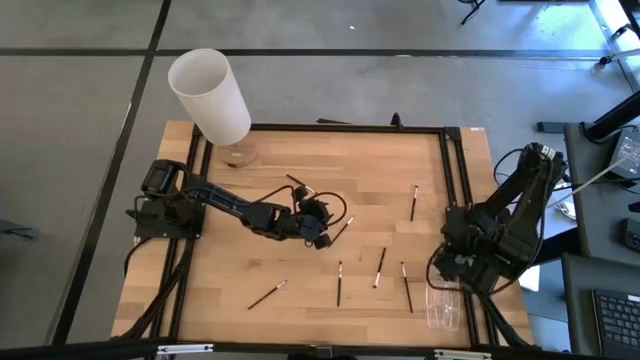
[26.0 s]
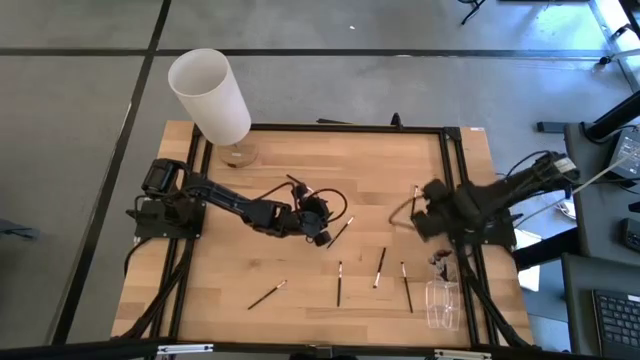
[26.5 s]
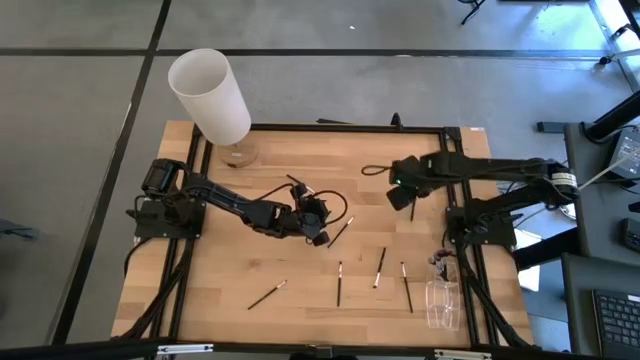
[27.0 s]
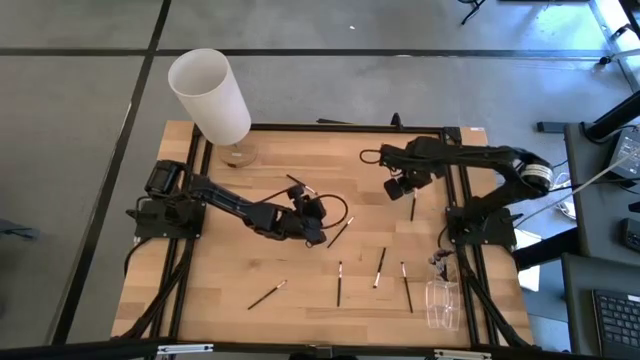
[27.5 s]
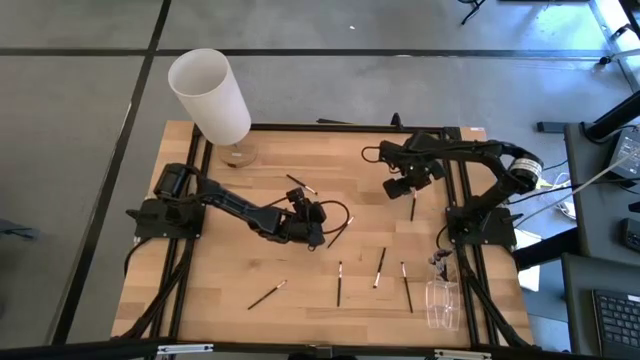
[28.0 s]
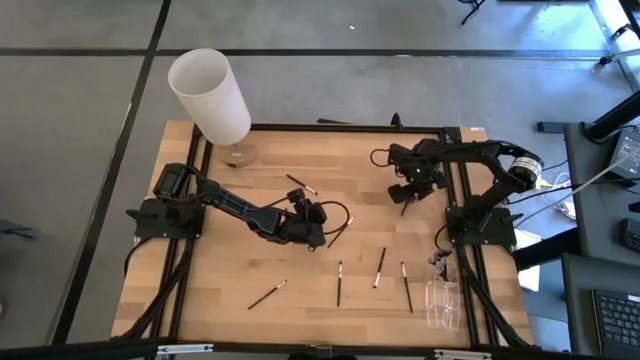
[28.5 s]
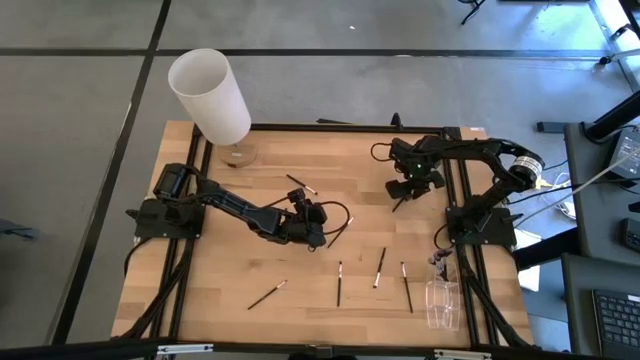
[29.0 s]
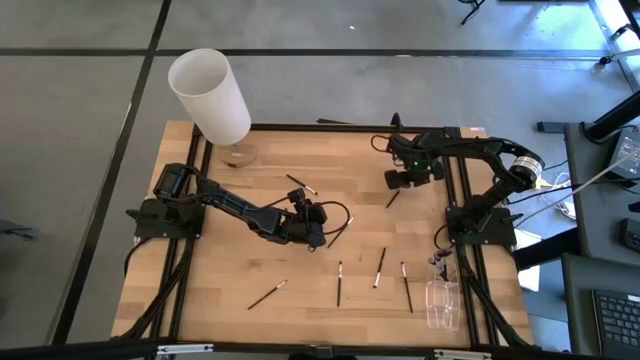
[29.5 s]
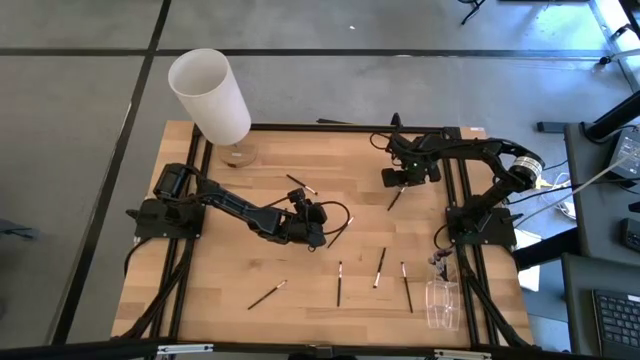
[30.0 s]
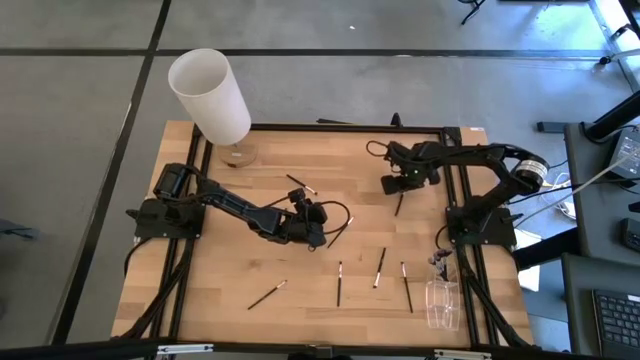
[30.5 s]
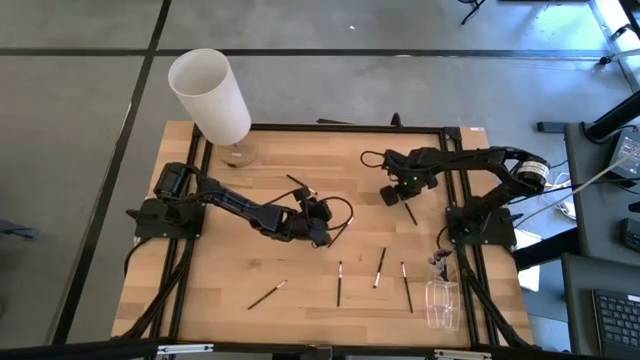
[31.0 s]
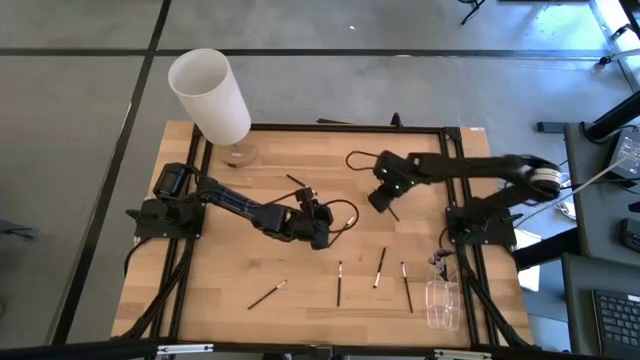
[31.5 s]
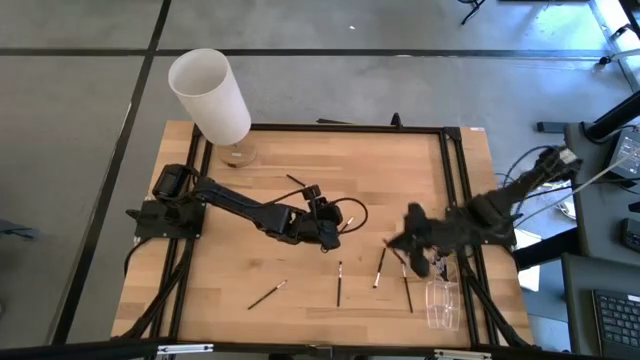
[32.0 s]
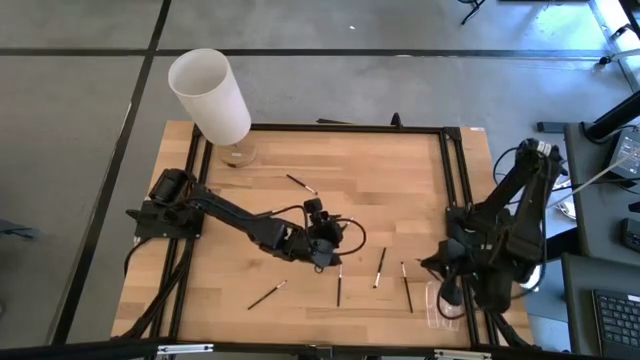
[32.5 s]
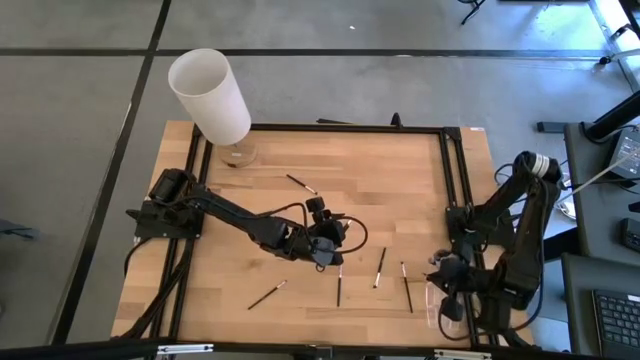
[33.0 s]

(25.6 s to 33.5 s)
Task: Put items in baskets/containers
Put the foundation brush into the transparent organizer

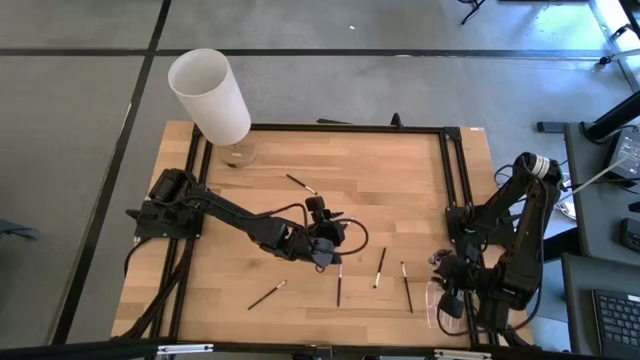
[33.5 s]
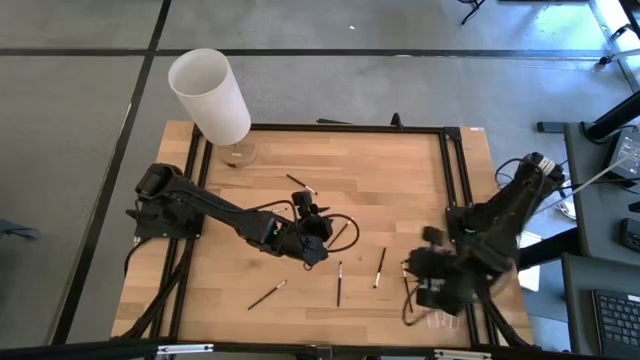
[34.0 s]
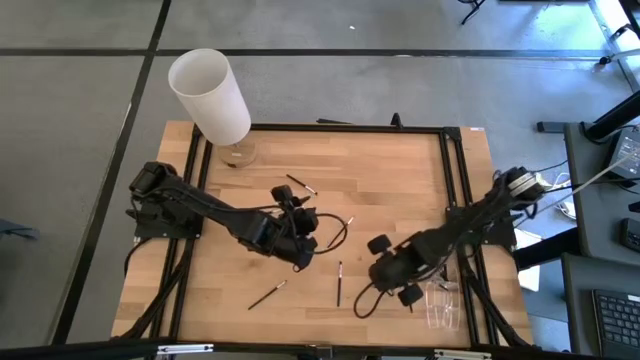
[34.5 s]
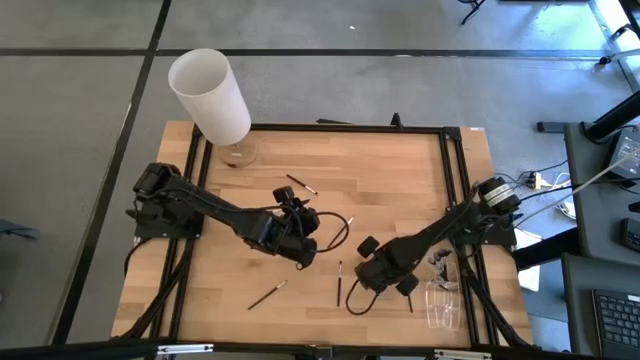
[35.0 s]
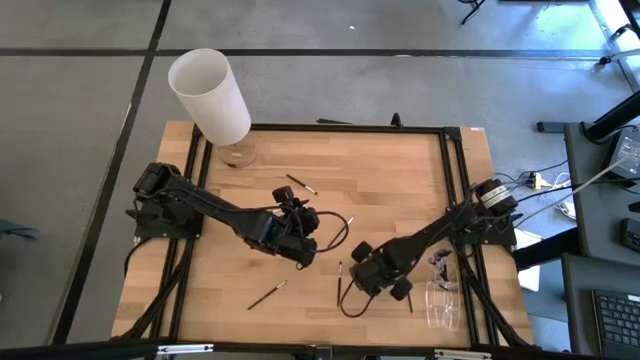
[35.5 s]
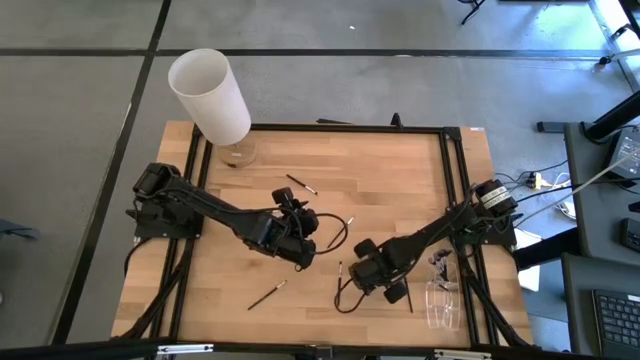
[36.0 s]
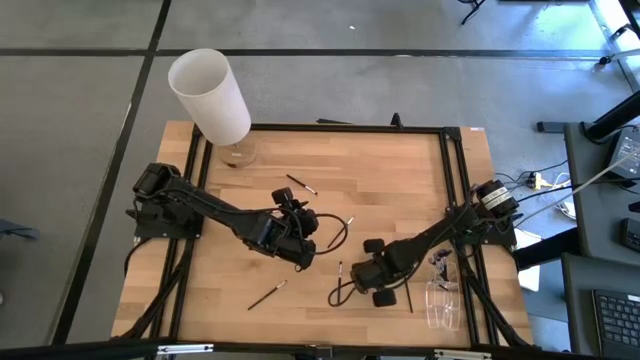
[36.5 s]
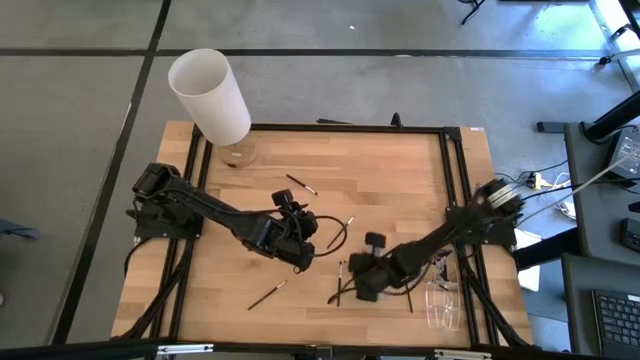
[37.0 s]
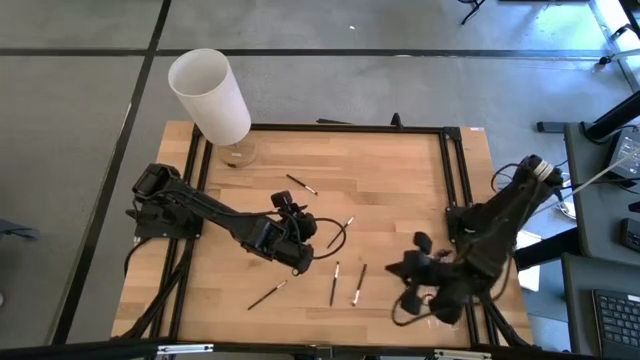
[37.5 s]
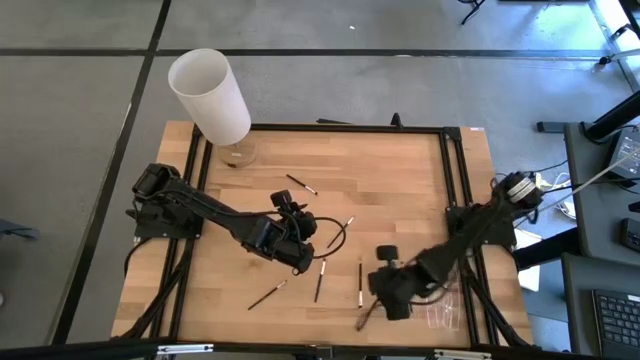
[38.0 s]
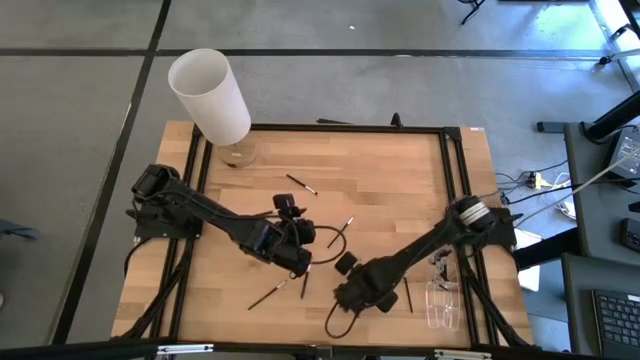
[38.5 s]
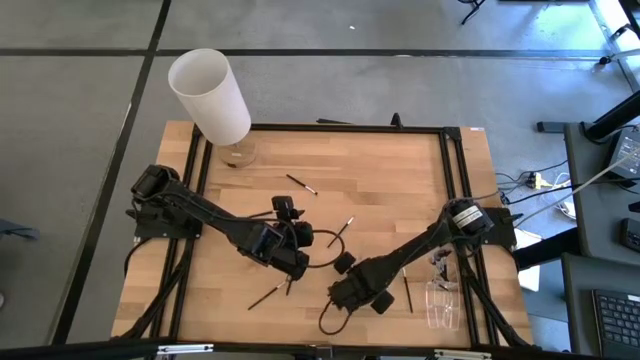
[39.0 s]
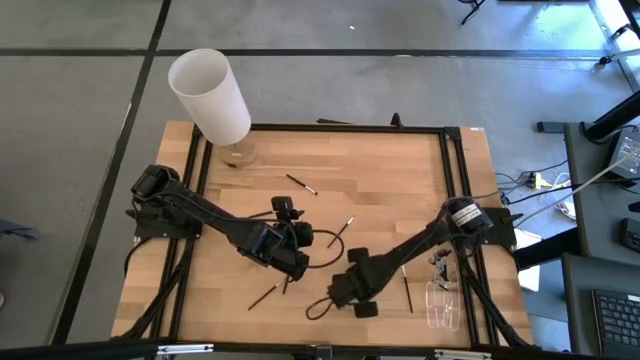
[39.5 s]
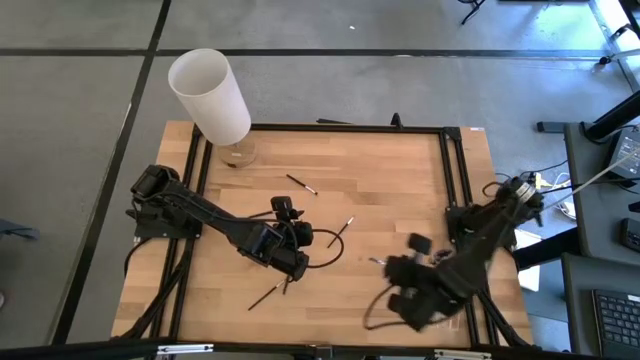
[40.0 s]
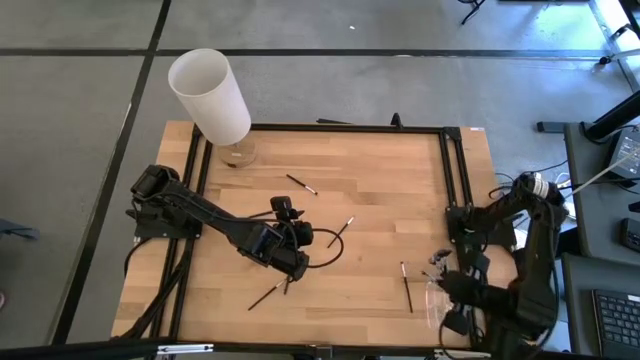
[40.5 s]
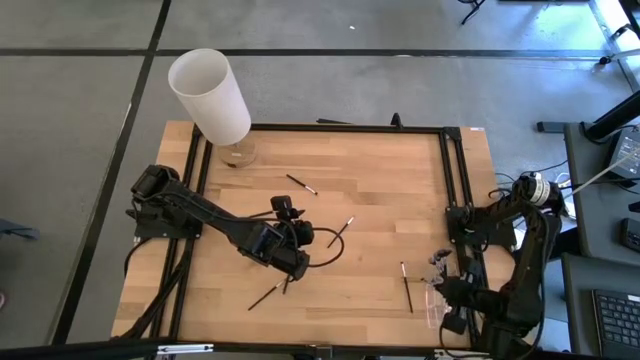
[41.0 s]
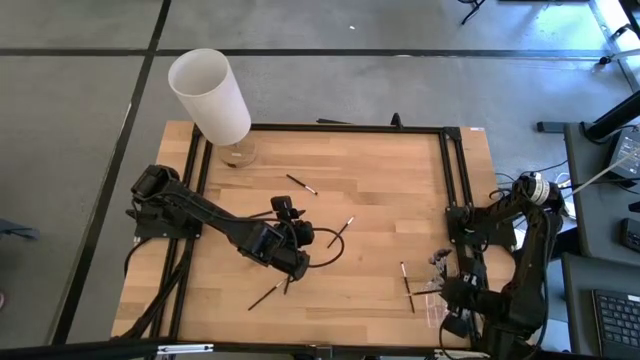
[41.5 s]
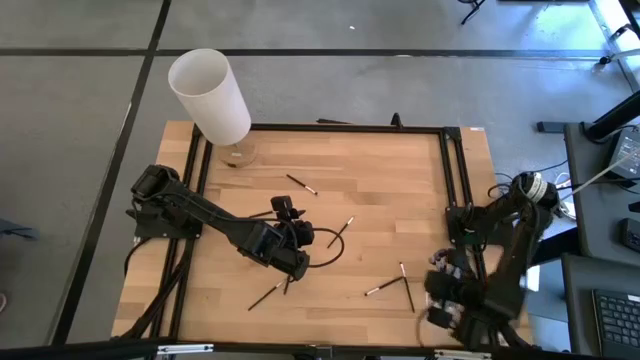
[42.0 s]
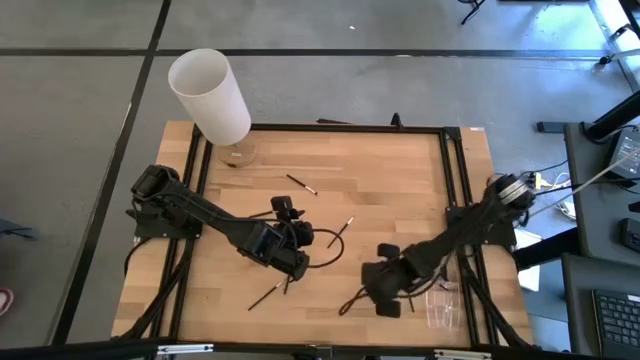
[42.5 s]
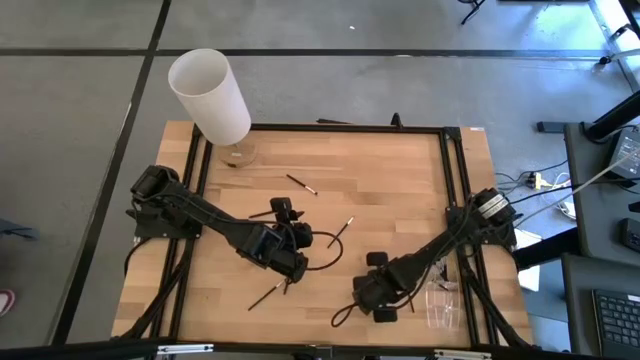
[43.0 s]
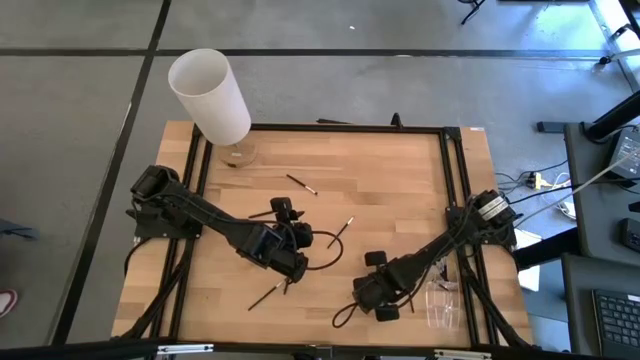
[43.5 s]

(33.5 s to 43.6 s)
Put the eyeshadow brush into the transparent organizer

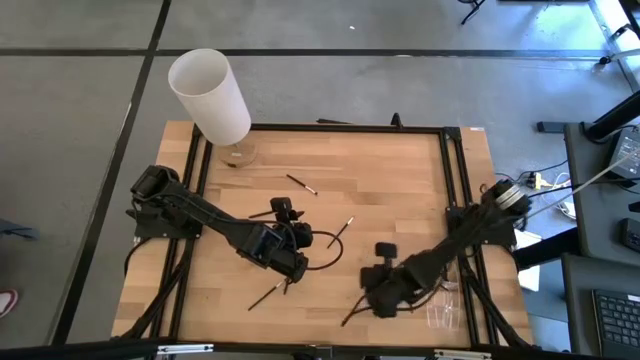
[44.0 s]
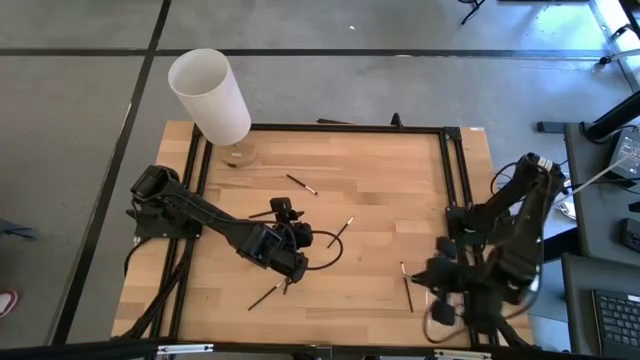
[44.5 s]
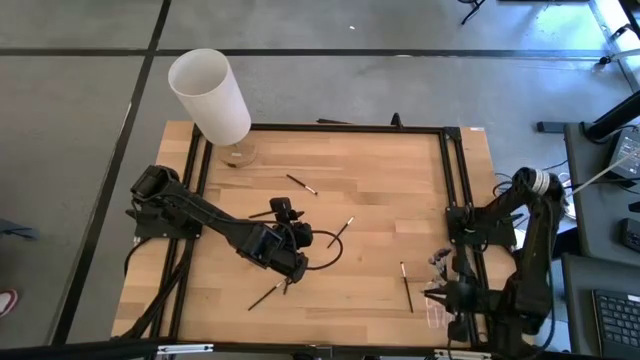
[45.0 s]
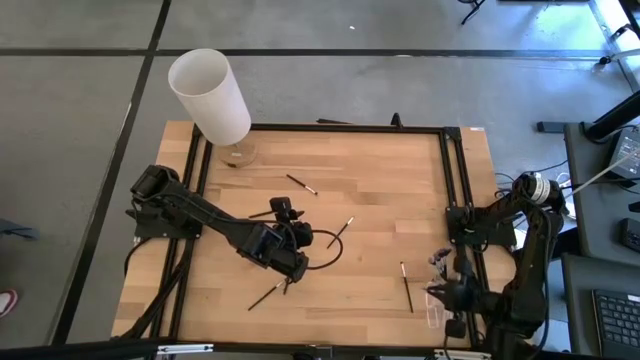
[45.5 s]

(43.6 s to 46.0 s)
Put the eyeshadow brush into the transparent organizer

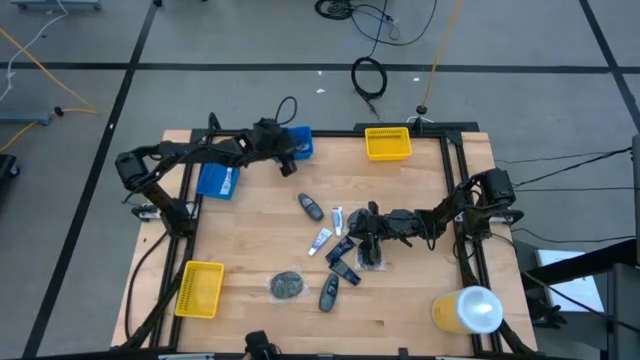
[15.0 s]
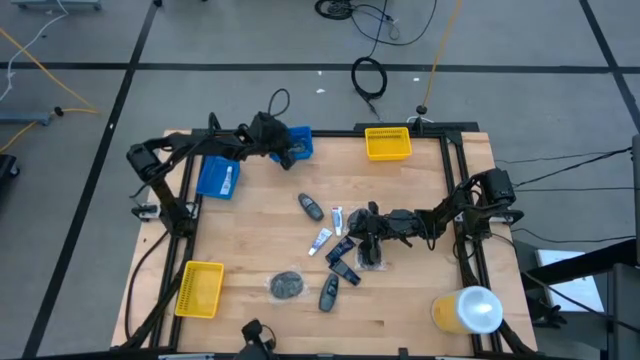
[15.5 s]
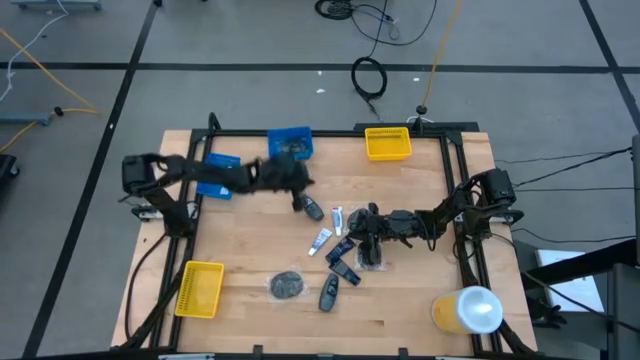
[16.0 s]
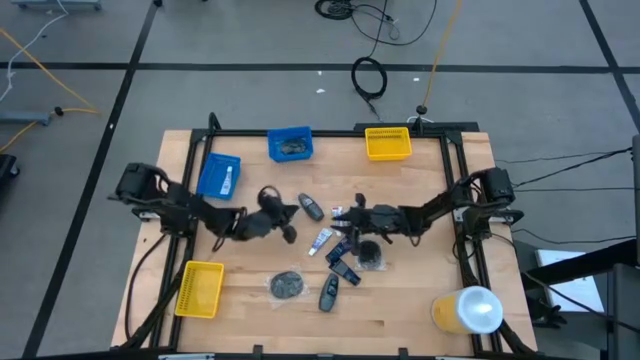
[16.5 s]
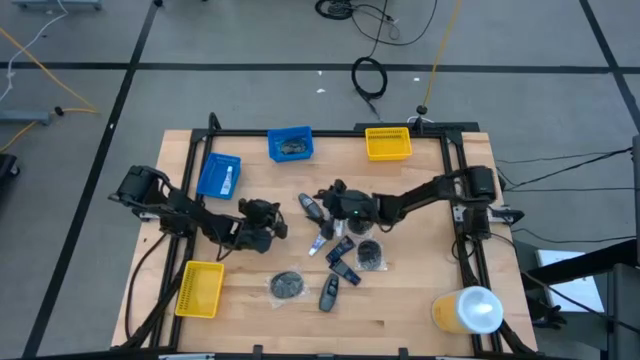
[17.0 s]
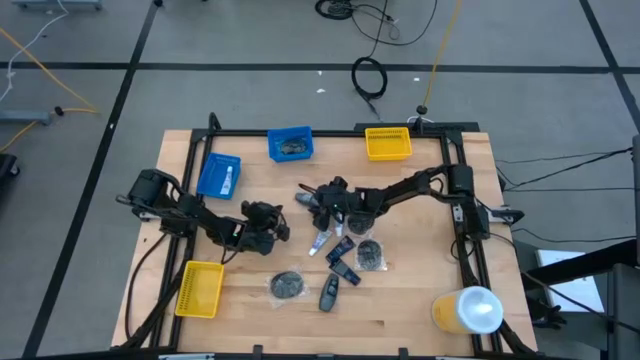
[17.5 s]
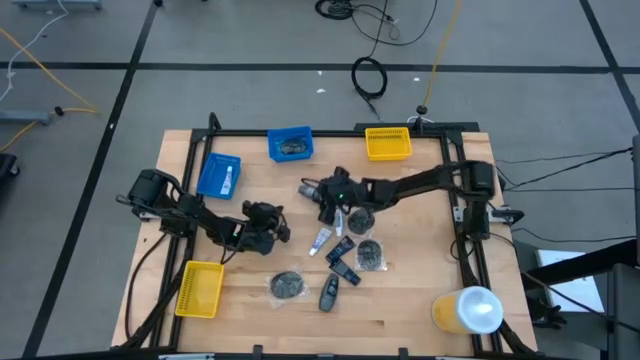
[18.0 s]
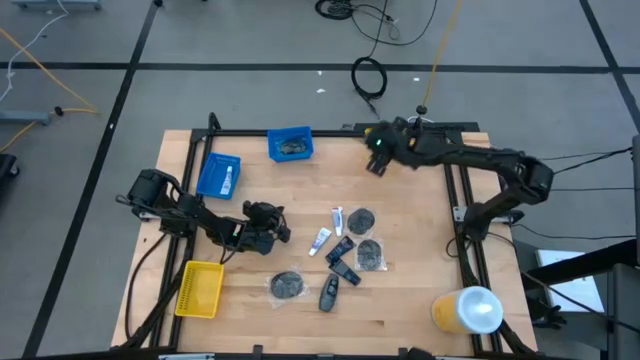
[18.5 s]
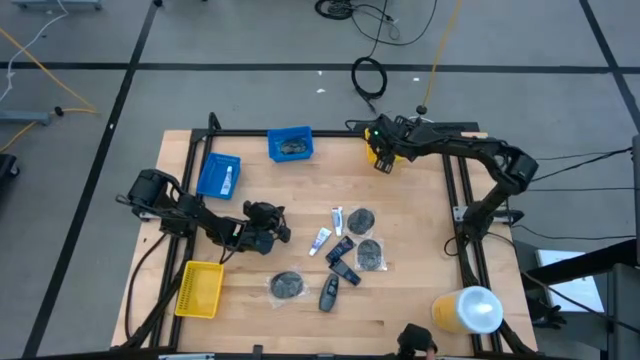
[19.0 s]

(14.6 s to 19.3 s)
Task: Pick & Place Travel size toiletries
Put the black deodorant into the top yellow bin
